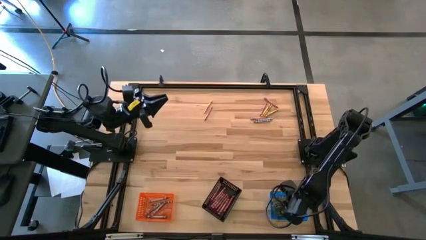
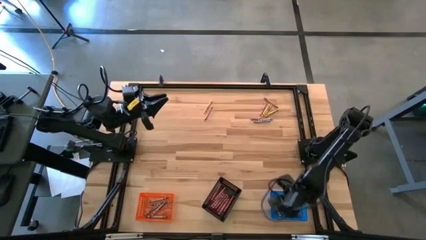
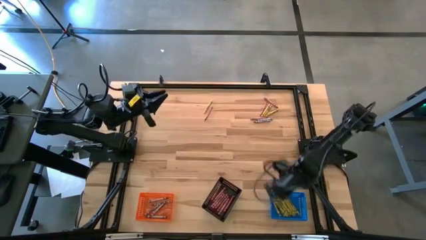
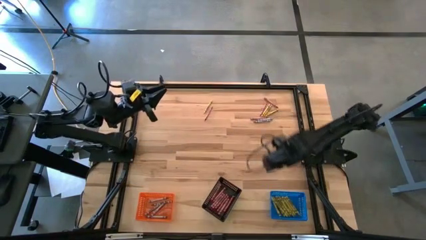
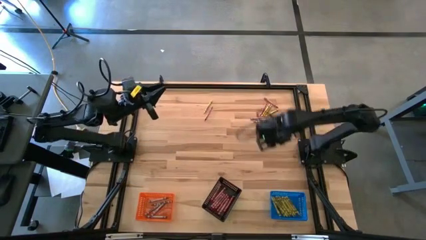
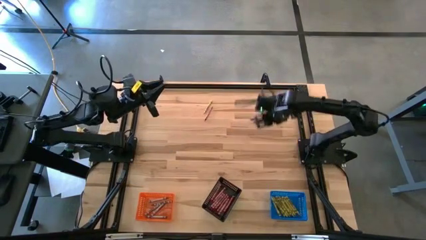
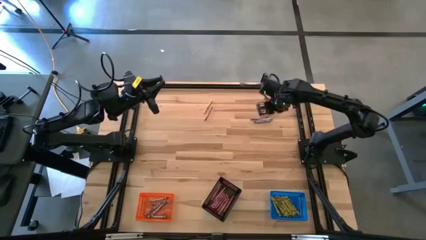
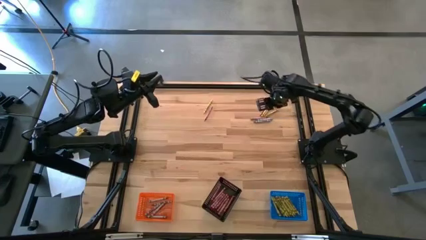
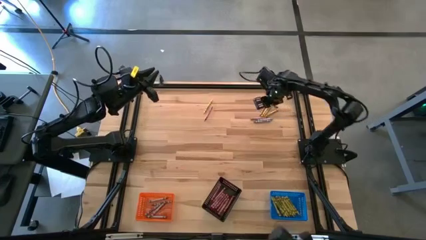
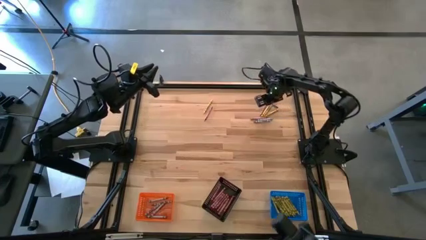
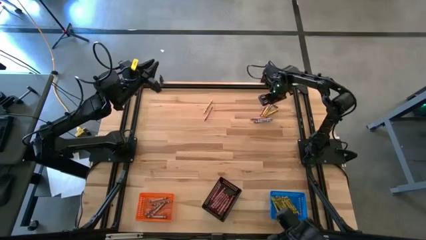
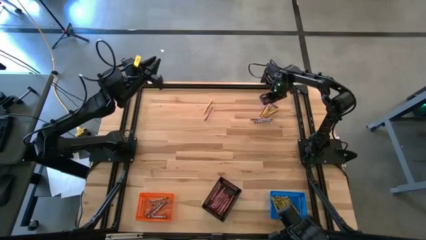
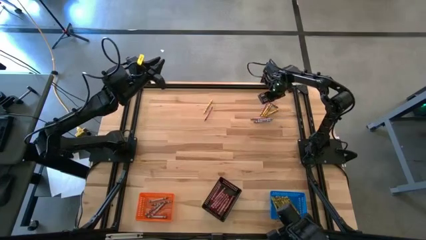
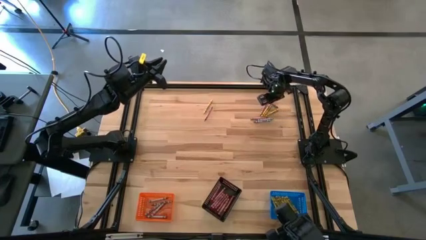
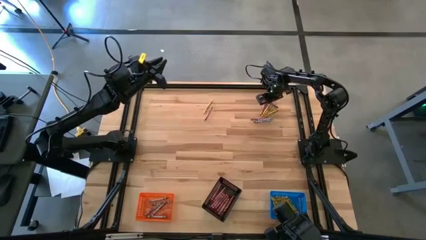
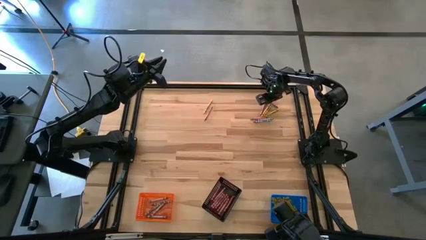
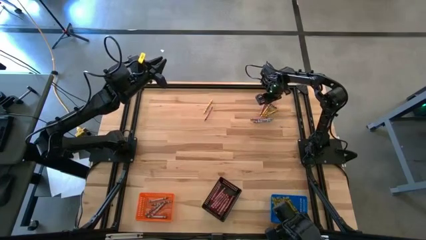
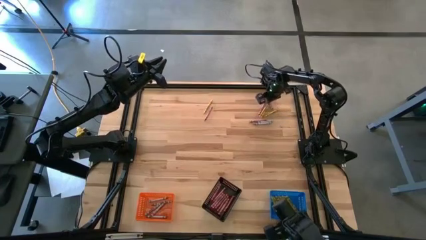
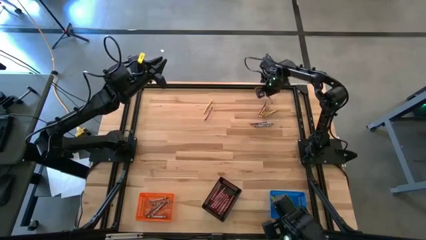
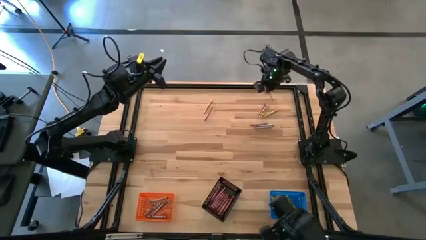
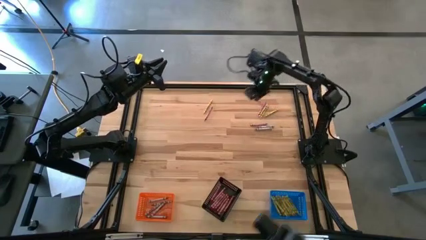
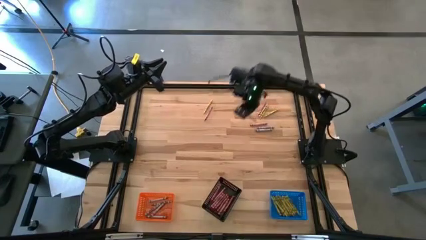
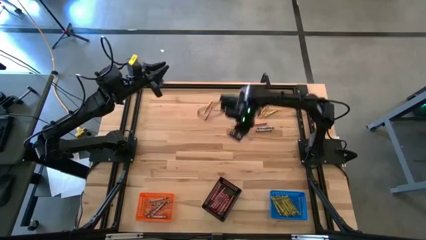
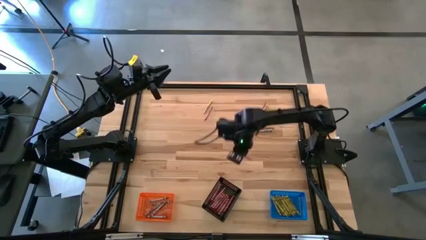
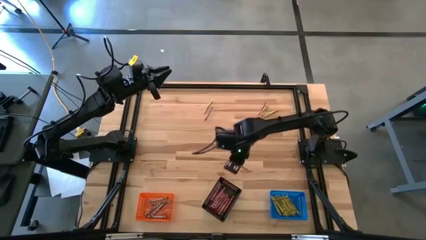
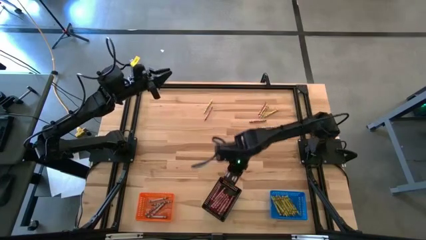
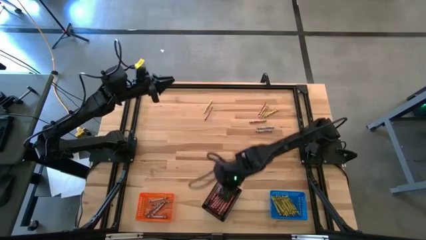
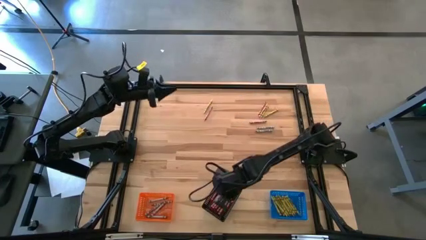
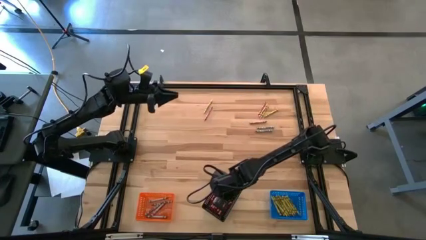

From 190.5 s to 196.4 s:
Task: Sort crayons
Put the red crayon into the black bin

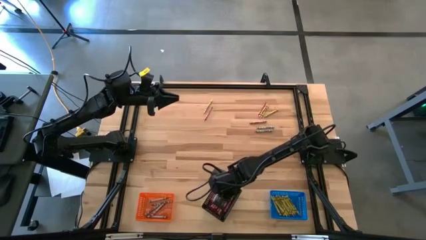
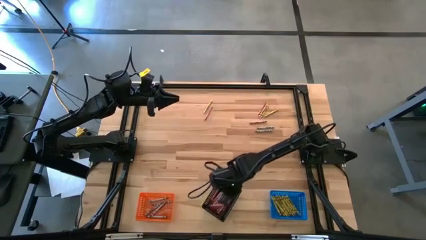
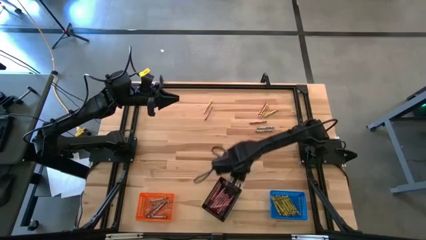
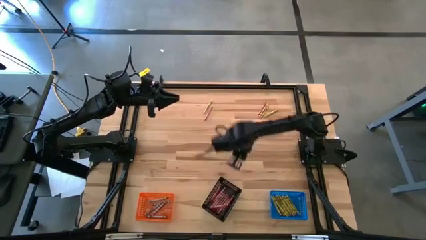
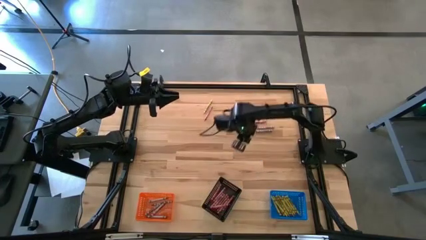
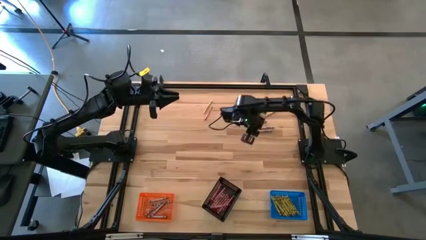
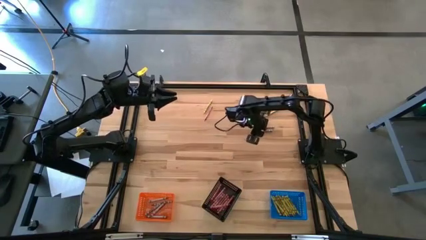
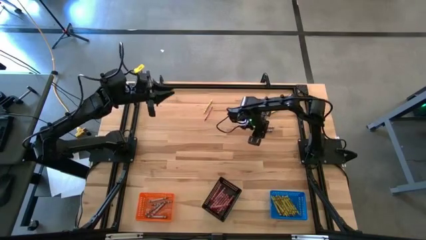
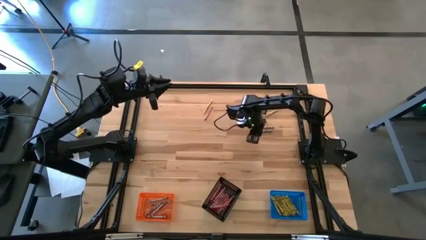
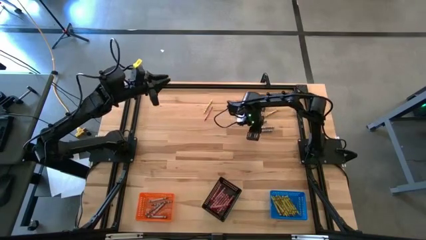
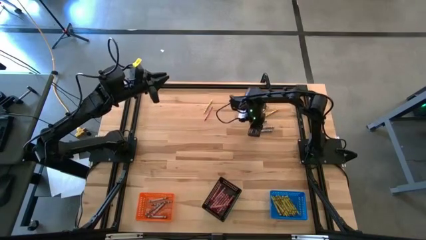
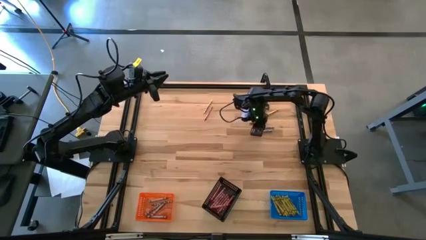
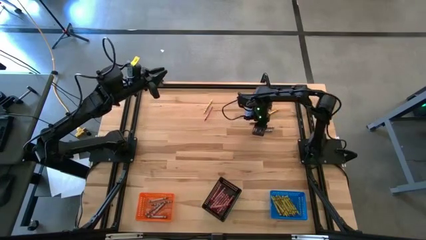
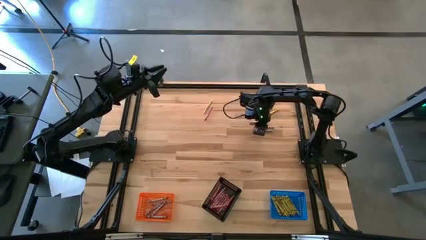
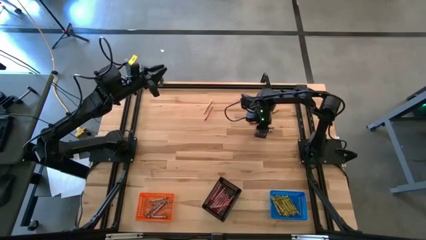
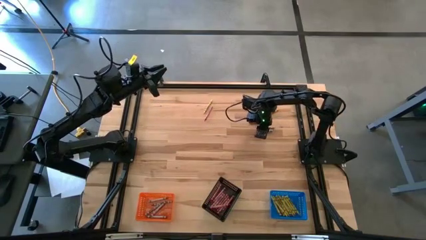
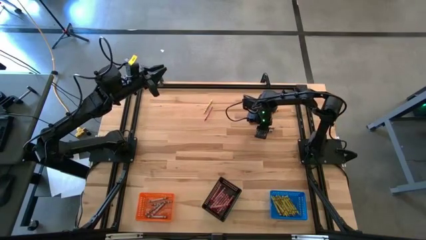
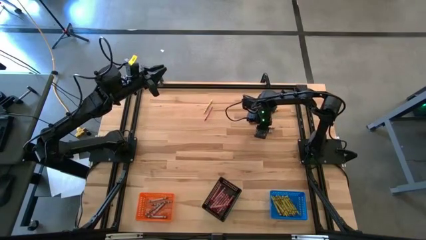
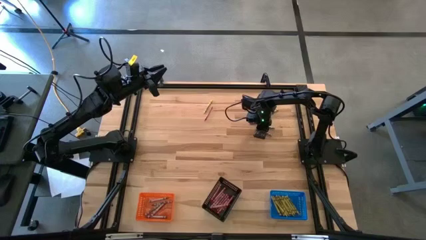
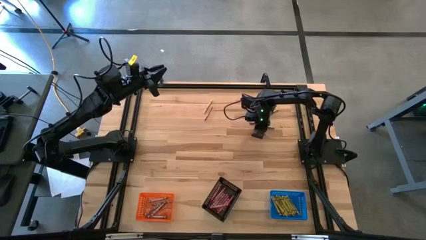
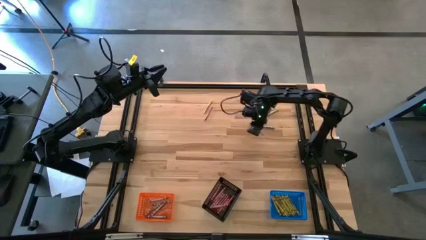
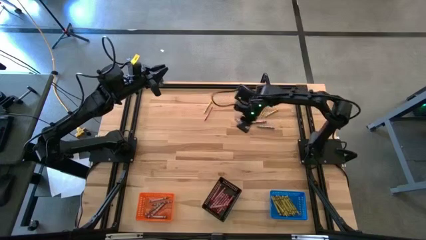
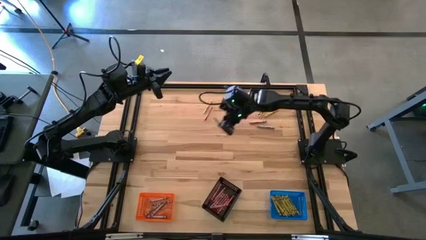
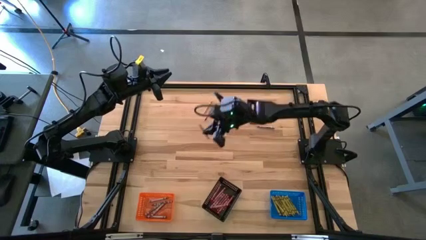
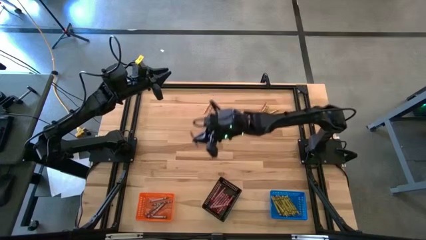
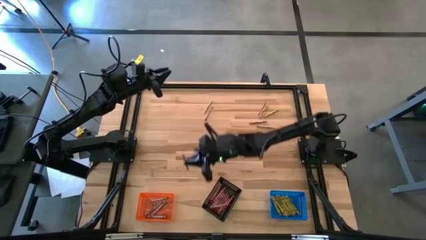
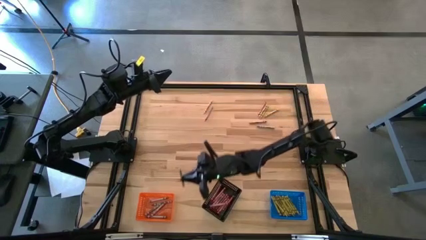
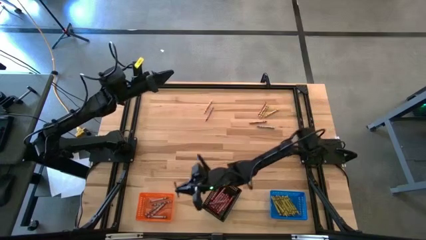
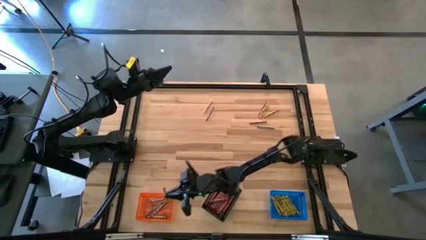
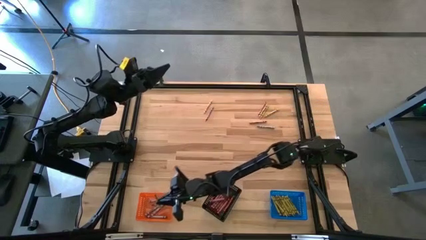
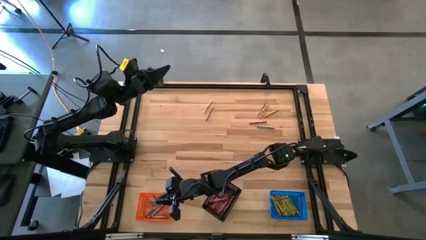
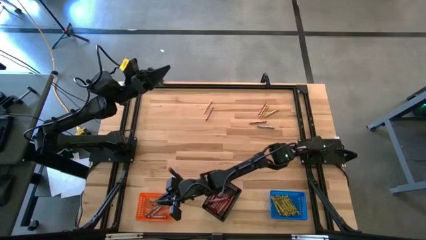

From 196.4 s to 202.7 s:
Put the gray crayon into the orange bin

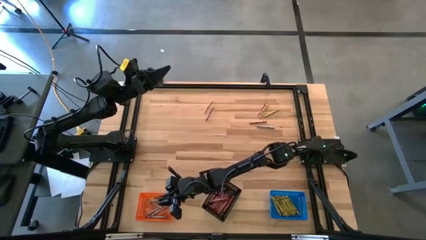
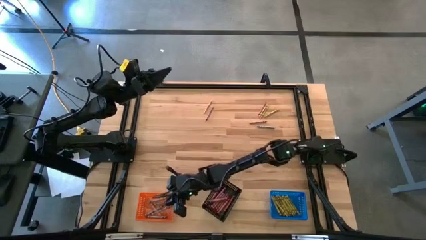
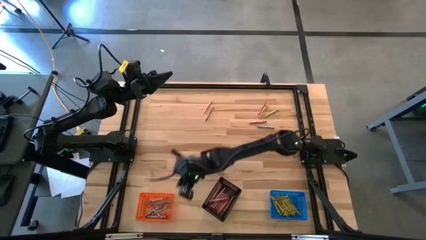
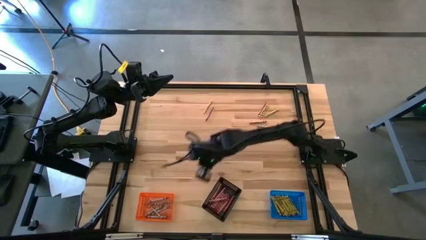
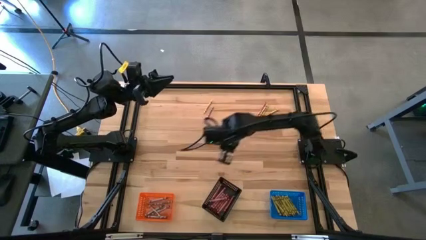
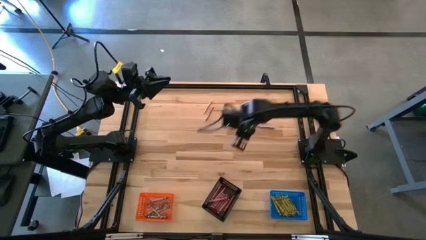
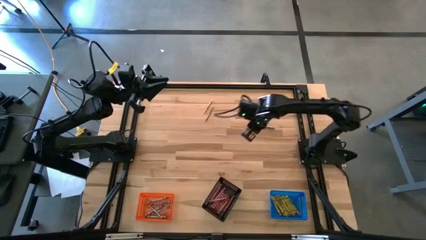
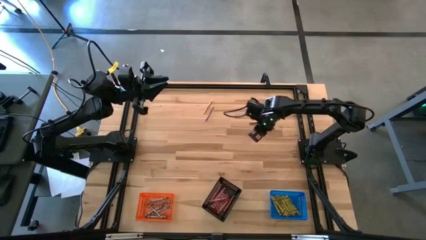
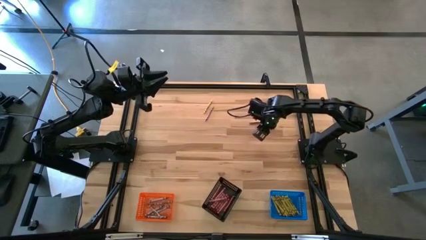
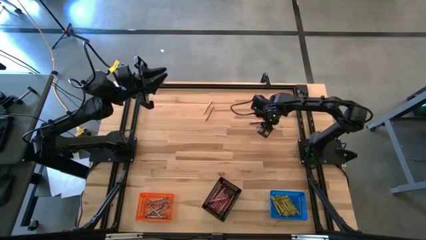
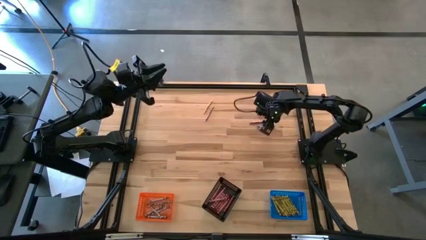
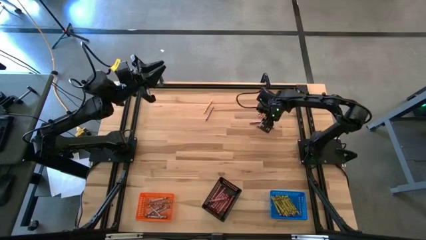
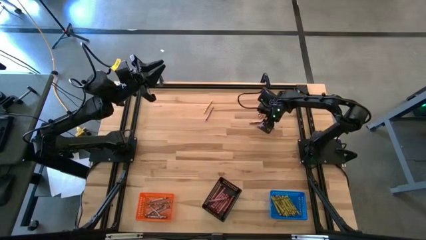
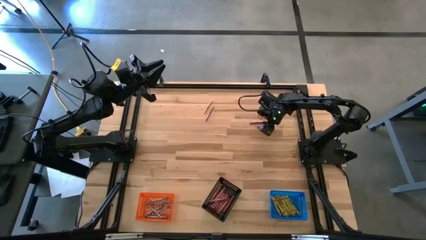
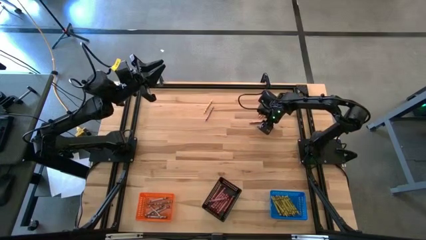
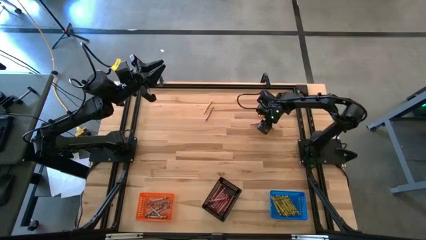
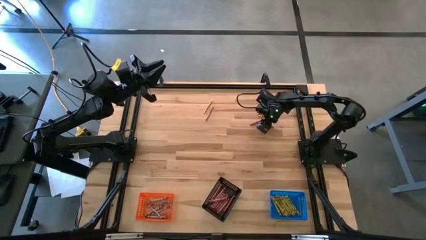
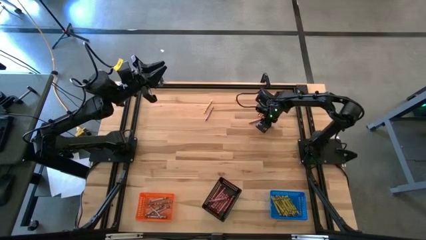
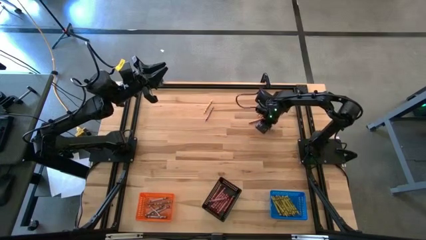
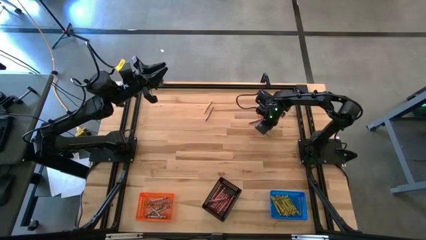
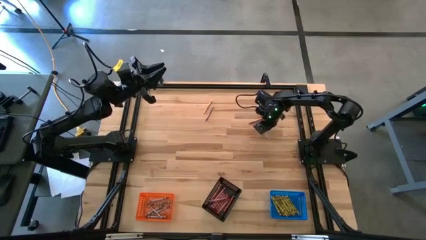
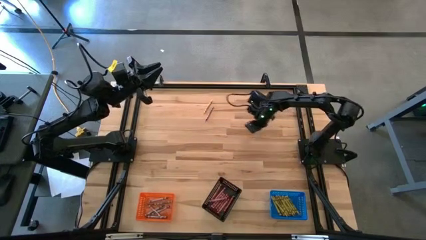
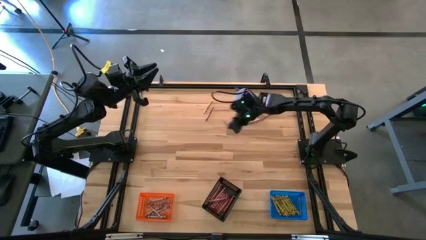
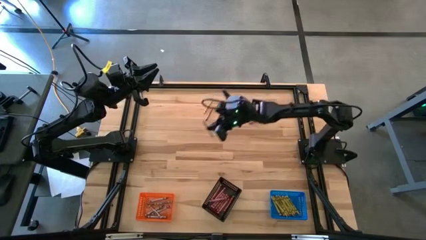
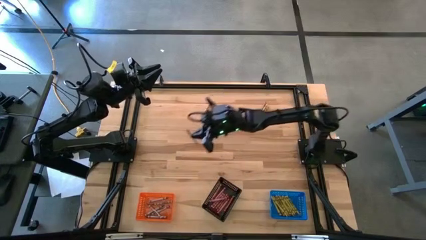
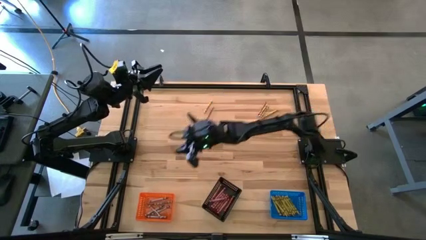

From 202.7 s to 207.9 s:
Put the gray crayon into the orange bin
